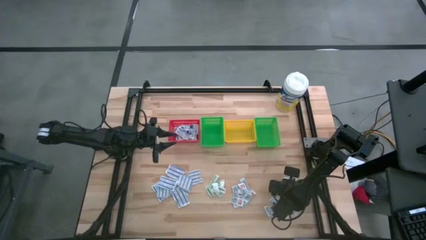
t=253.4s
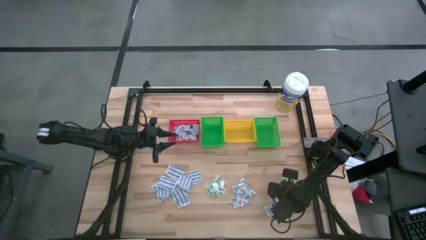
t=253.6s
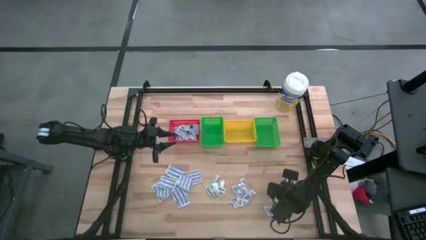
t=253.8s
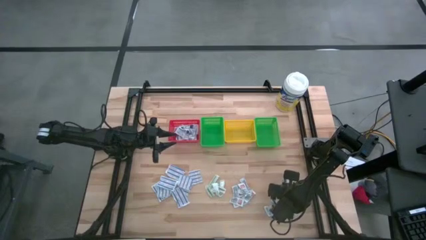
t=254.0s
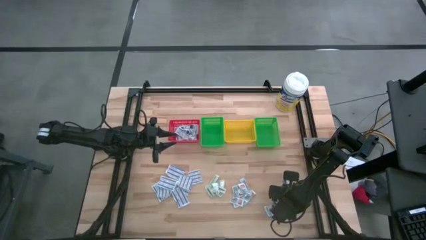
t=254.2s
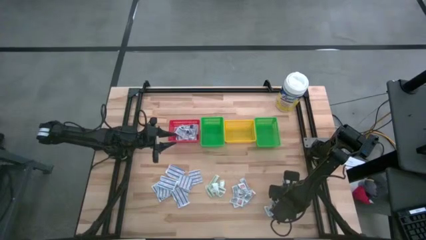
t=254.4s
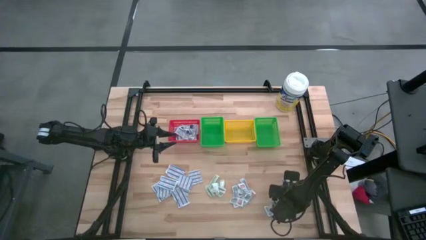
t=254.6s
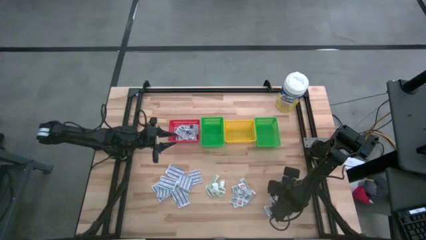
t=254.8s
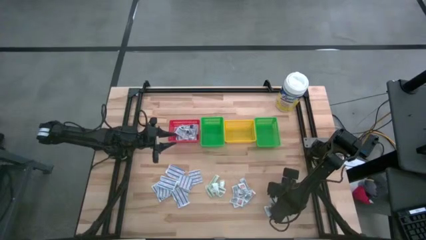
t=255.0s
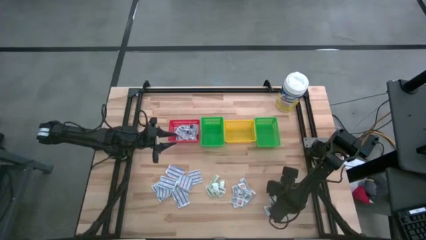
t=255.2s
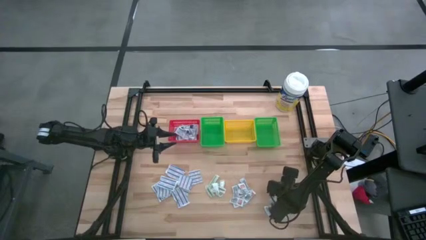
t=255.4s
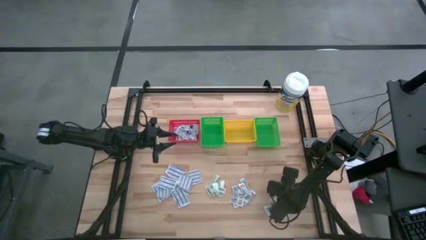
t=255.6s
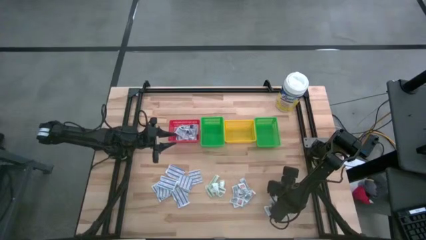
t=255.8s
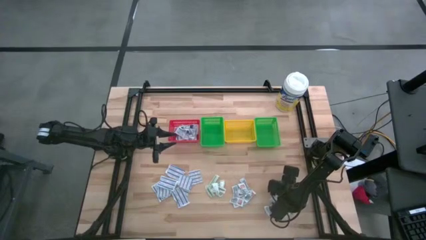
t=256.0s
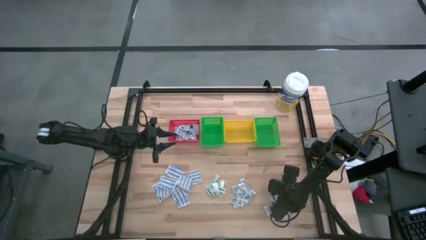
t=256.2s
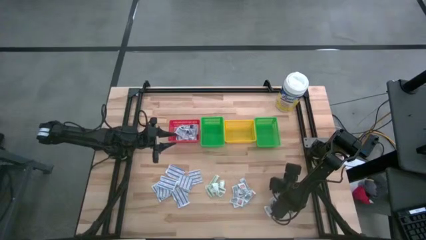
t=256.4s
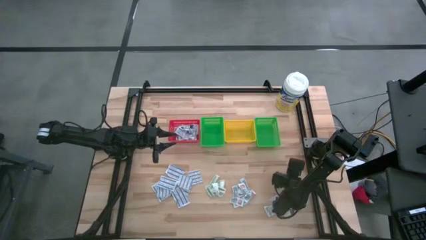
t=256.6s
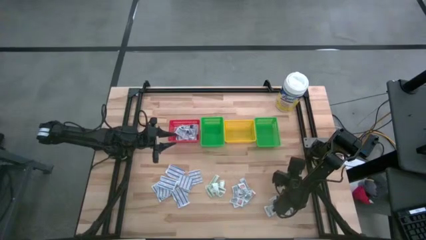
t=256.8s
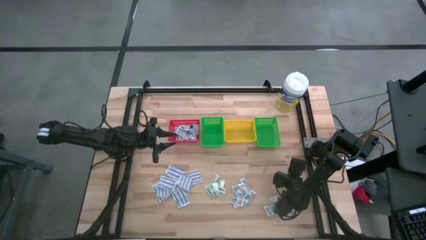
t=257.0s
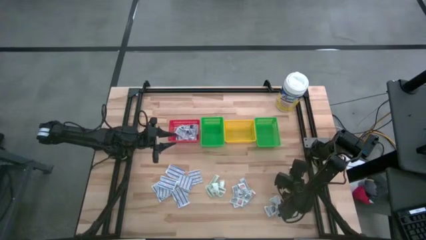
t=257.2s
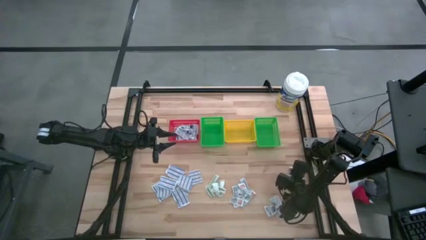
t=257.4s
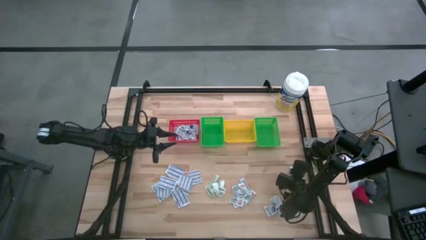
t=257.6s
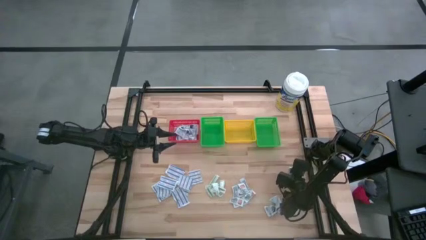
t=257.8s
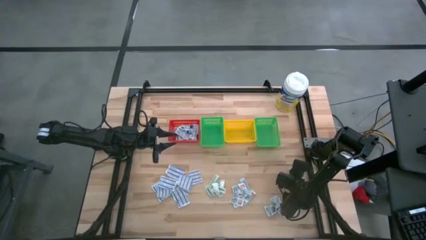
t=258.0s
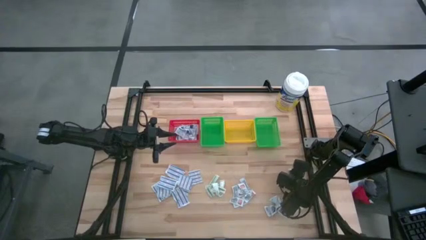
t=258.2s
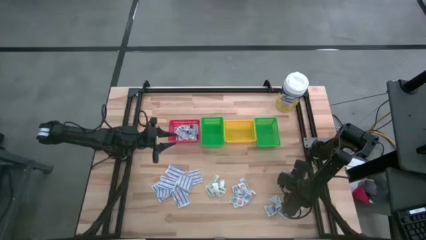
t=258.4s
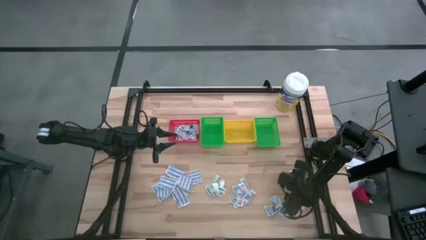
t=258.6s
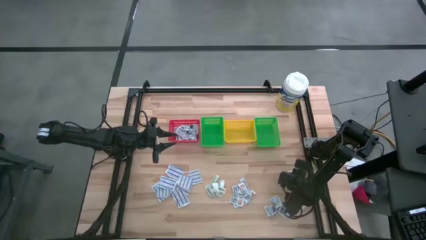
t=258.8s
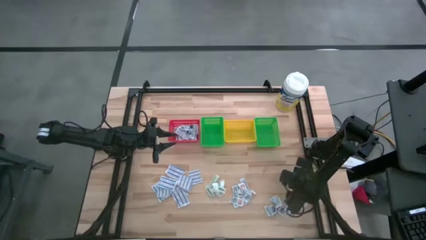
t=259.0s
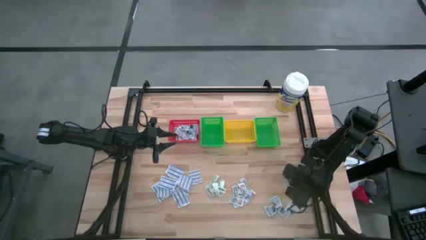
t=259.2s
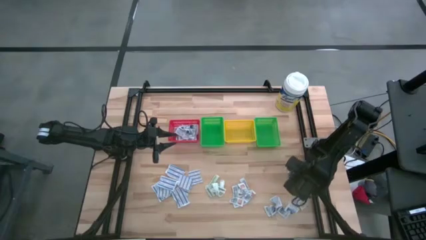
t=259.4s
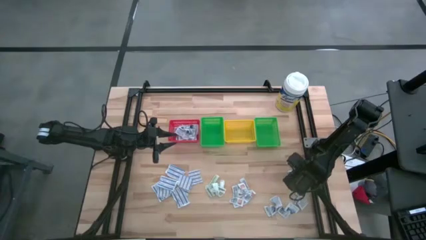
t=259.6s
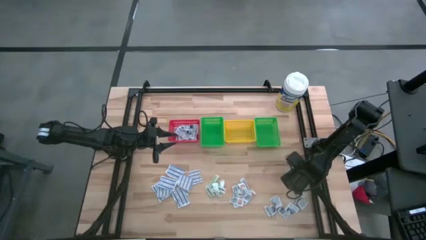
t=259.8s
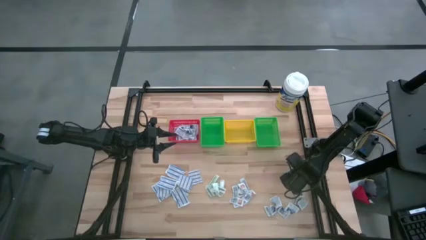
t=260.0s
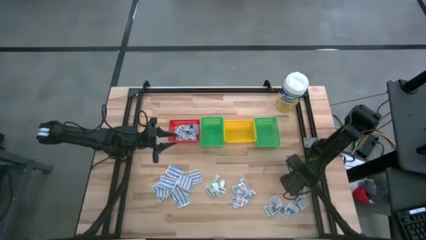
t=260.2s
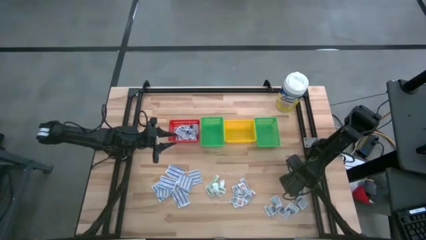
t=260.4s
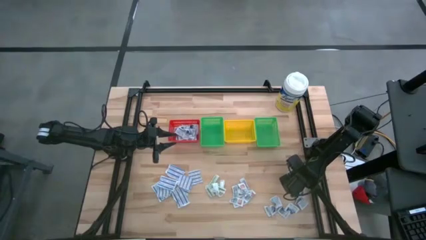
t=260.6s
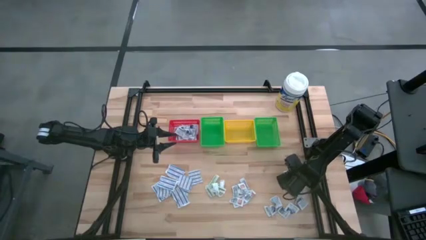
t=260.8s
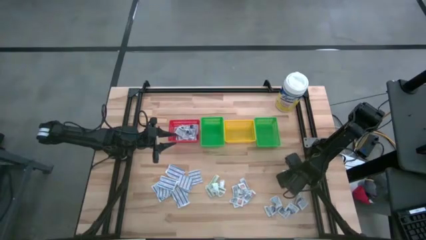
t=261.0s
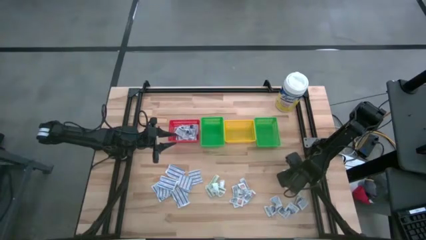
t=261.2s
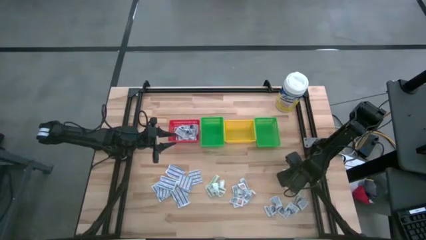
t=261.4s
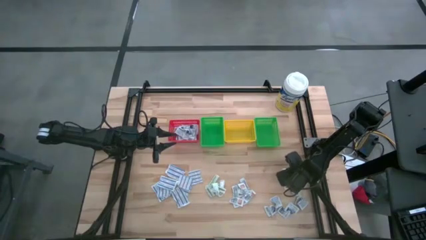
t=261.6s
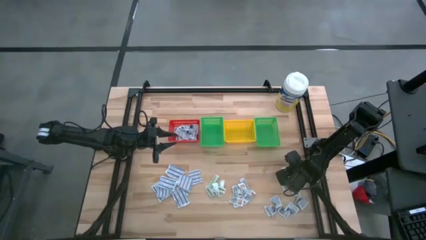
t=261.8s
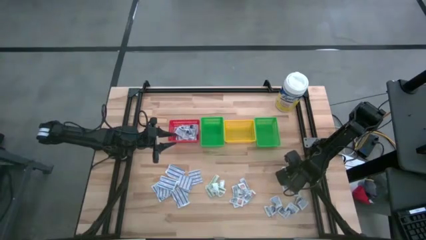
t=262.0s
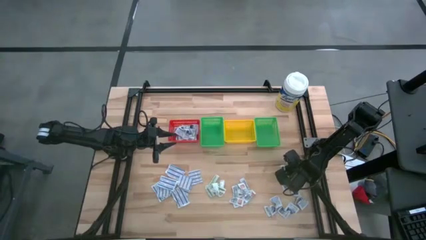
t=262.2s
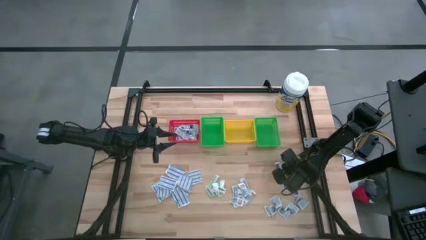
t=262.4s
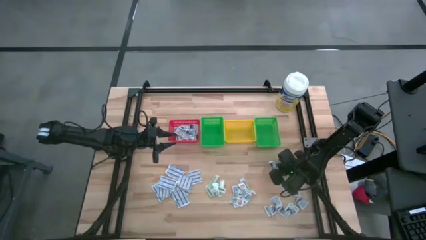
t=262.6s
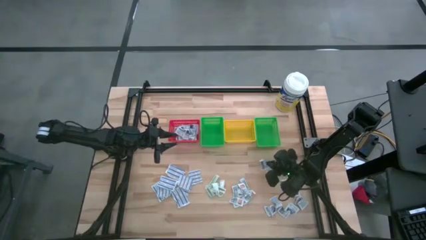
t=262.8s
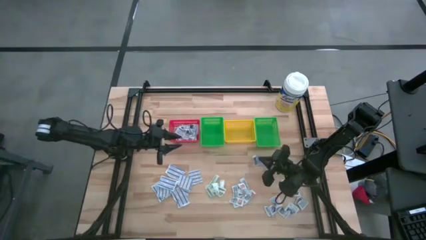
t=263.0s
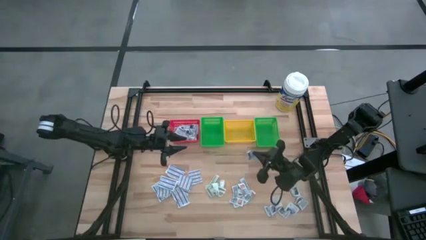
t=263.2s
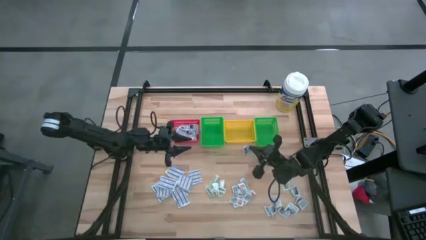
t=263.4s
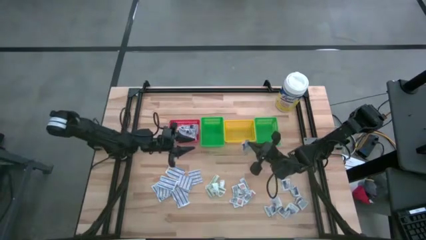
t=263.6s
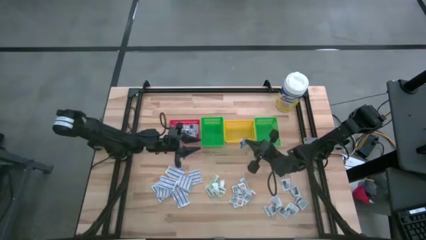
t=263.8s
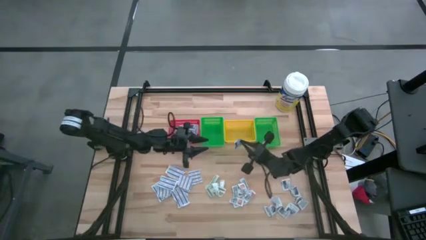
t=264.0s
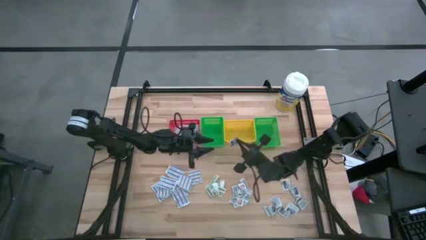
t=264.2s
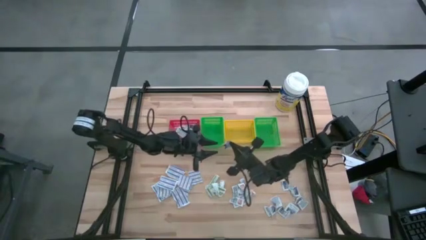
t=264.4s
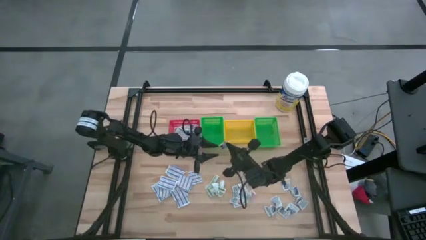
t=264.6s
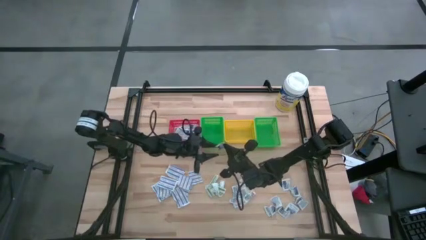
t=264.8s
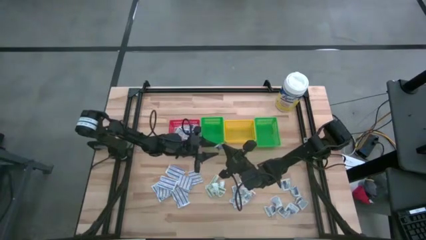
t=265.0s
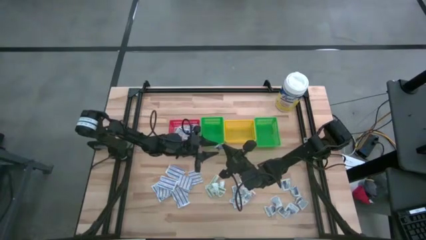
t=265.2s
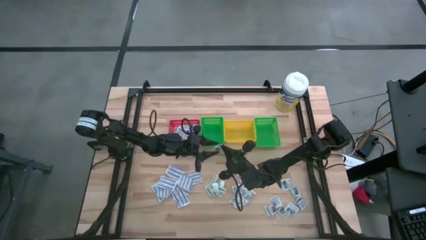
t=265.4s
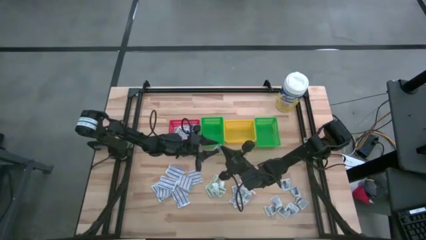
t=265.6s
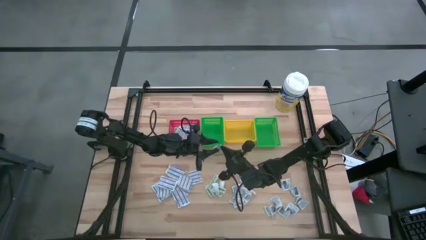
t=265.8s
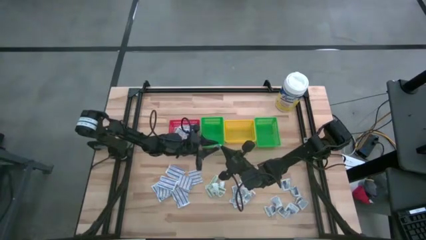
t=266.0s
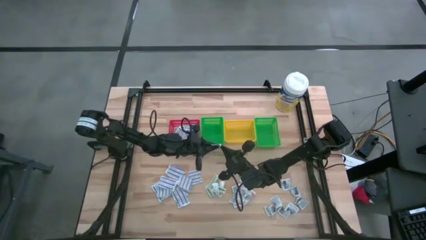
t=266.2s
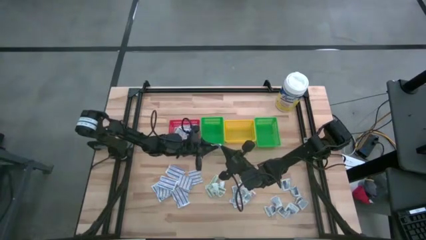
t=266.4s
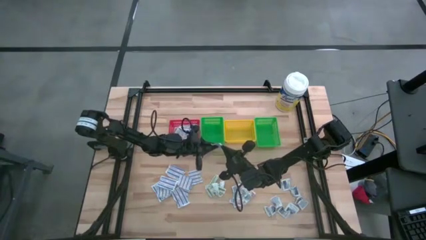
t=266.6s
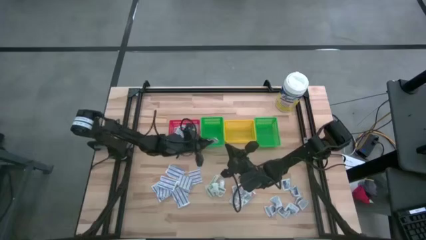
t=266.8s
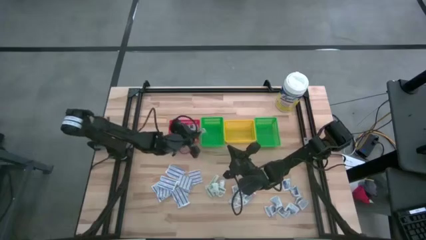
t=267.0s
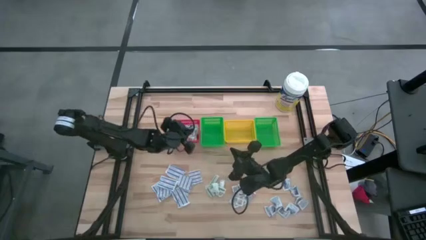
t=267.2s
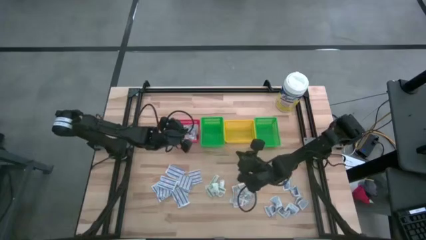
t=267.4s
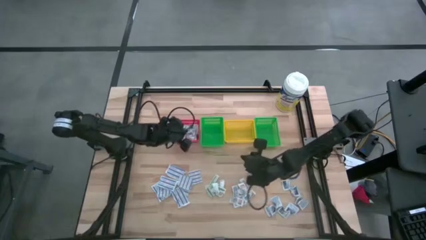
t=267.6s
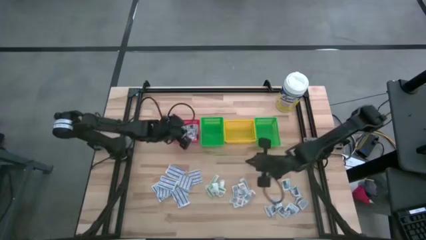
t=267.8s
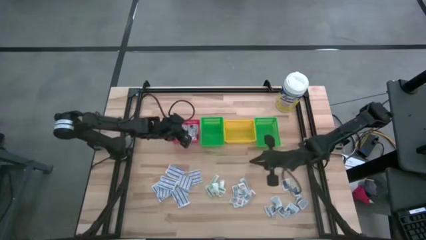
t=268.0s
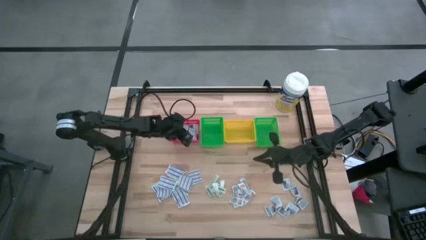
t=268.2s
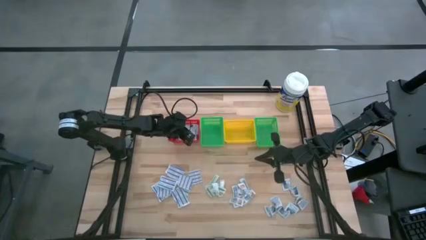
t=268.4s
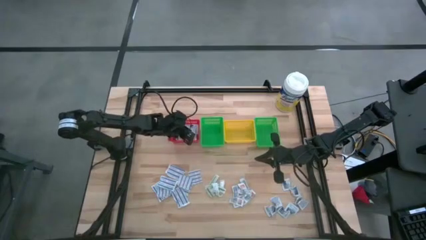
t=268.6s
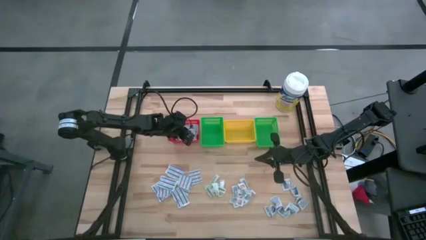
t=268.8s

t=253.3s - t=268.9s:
Task: Pick & Place First Aid Supplies
Put the alcohol pad into the red basket
